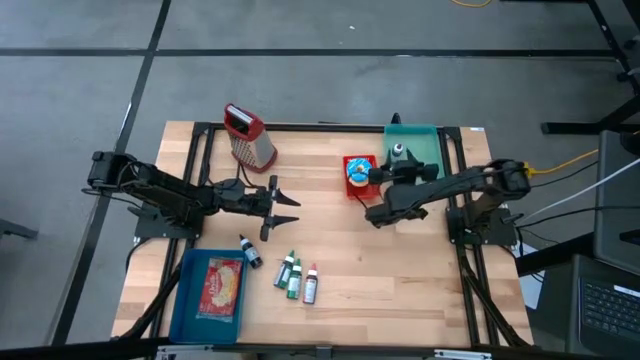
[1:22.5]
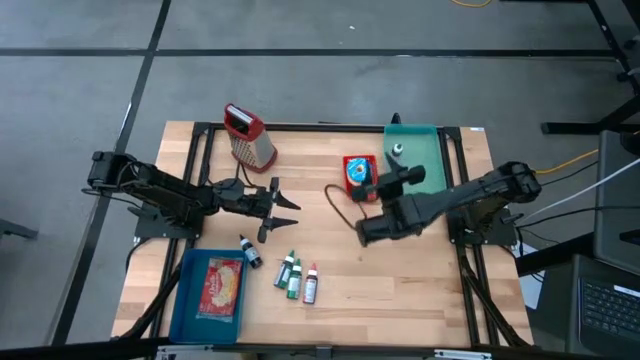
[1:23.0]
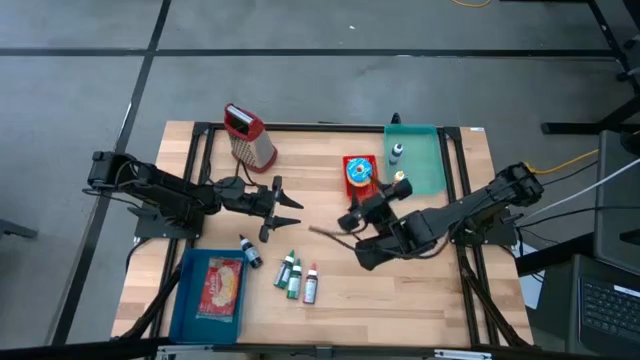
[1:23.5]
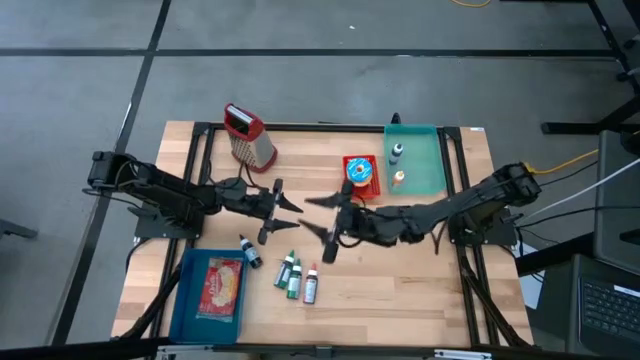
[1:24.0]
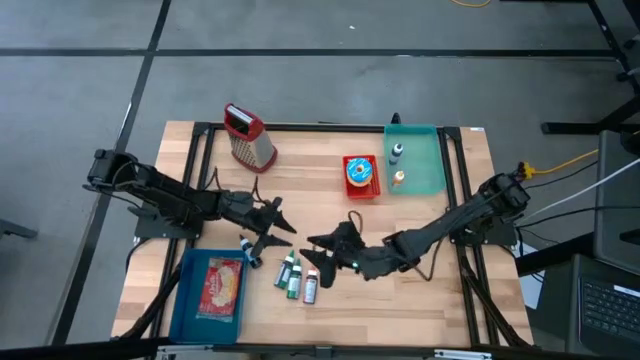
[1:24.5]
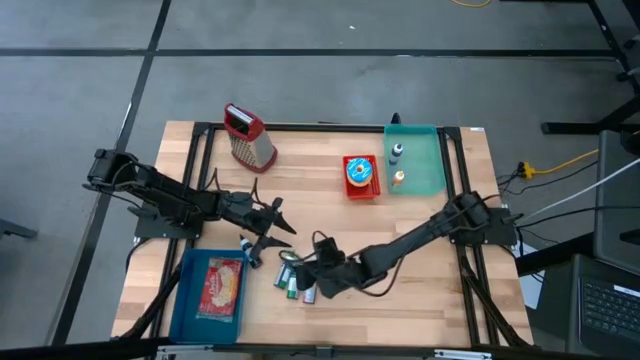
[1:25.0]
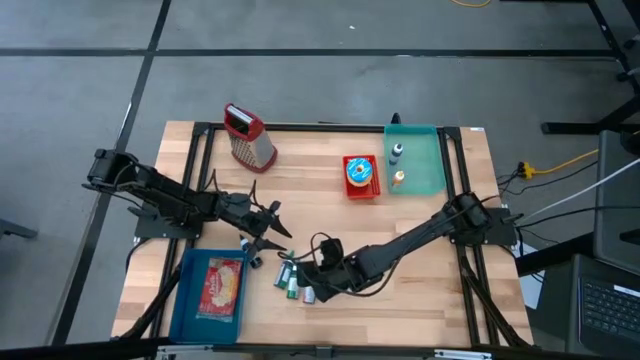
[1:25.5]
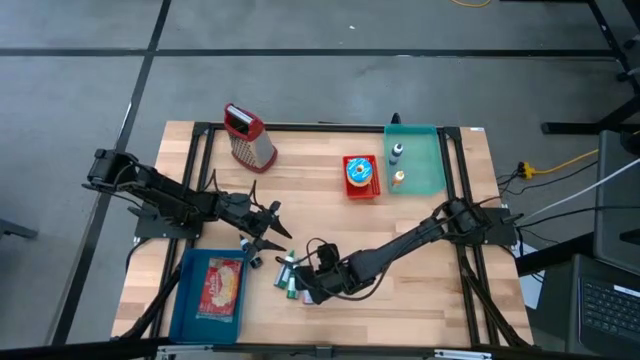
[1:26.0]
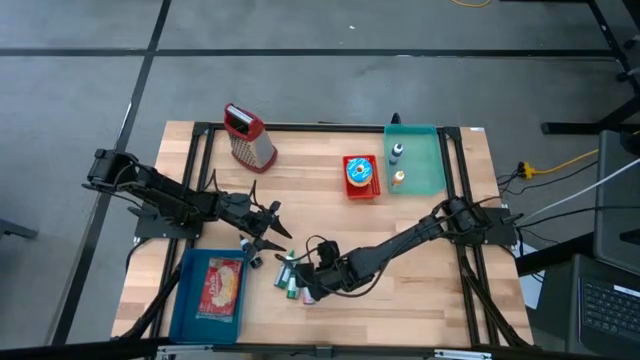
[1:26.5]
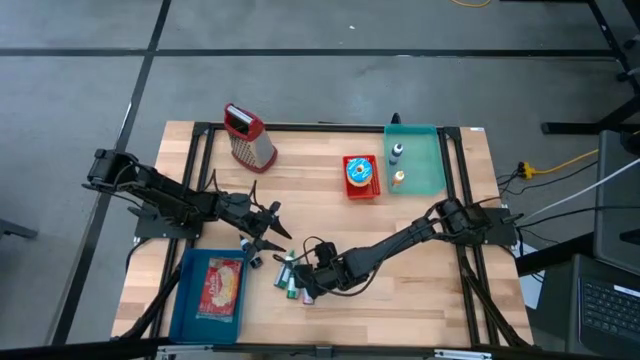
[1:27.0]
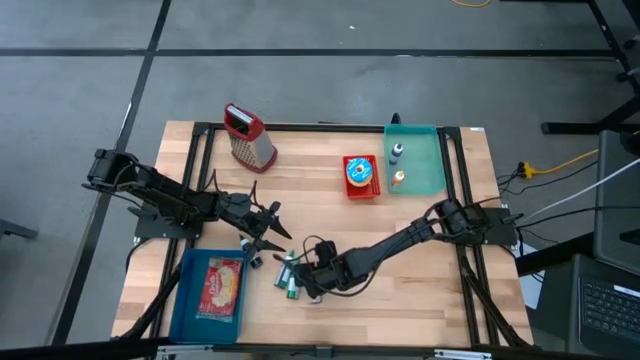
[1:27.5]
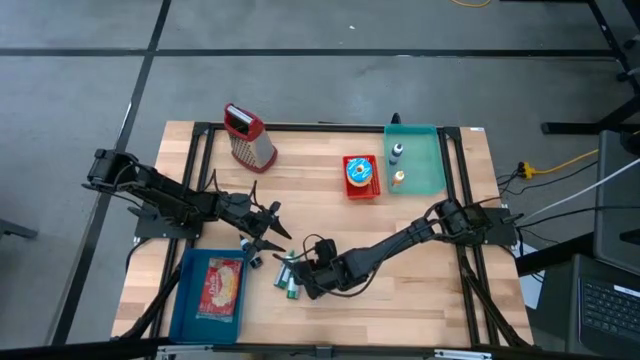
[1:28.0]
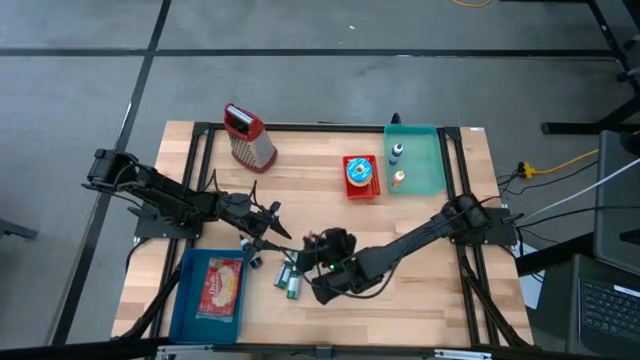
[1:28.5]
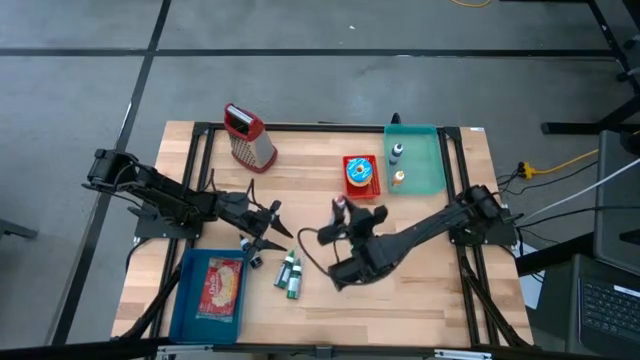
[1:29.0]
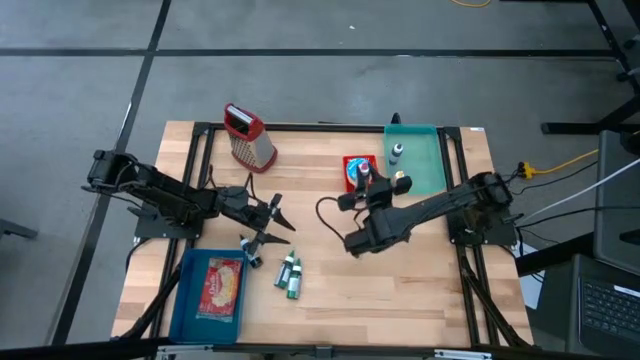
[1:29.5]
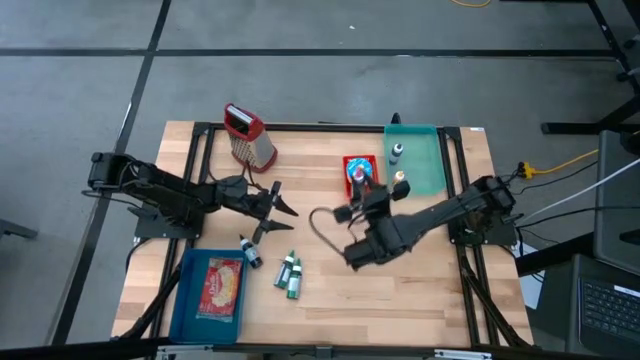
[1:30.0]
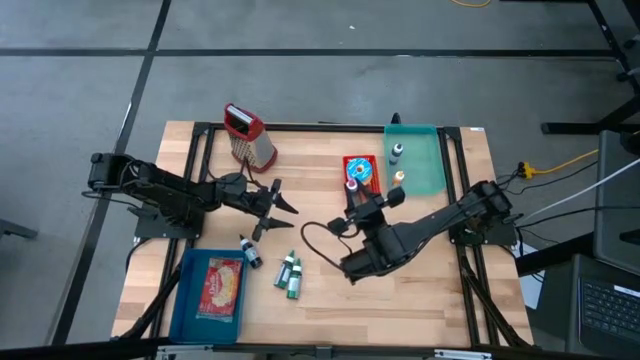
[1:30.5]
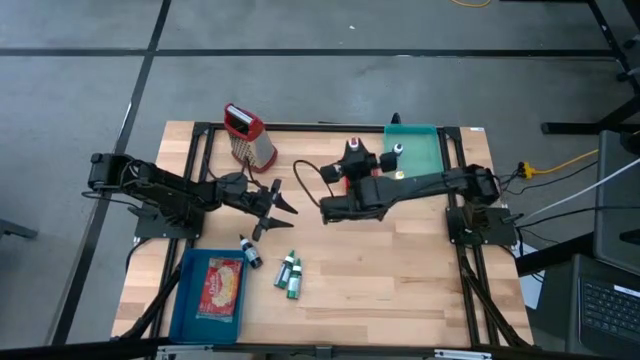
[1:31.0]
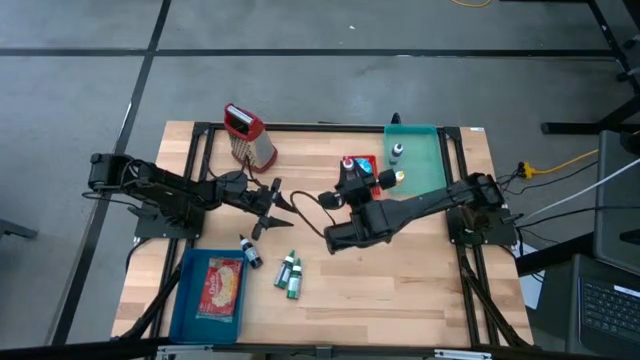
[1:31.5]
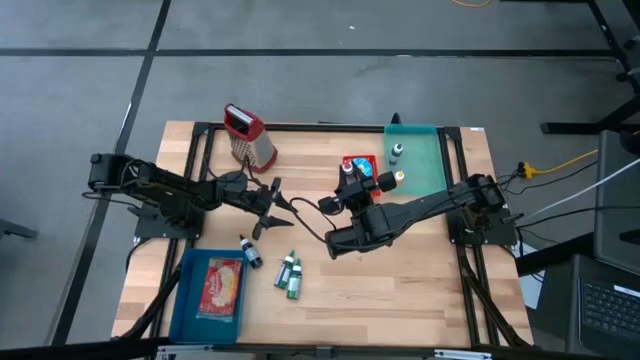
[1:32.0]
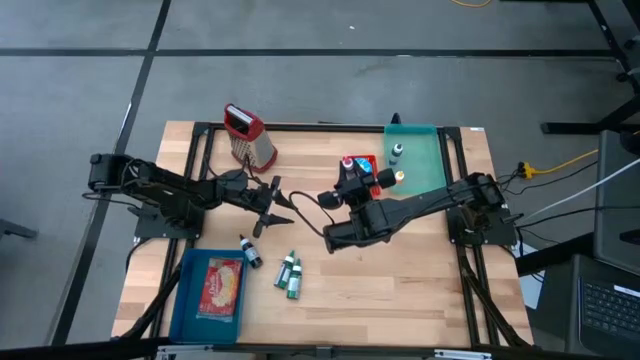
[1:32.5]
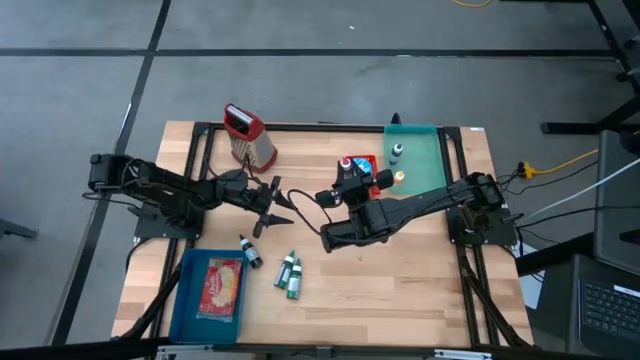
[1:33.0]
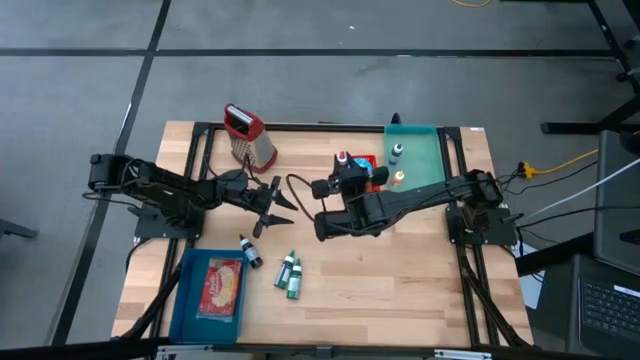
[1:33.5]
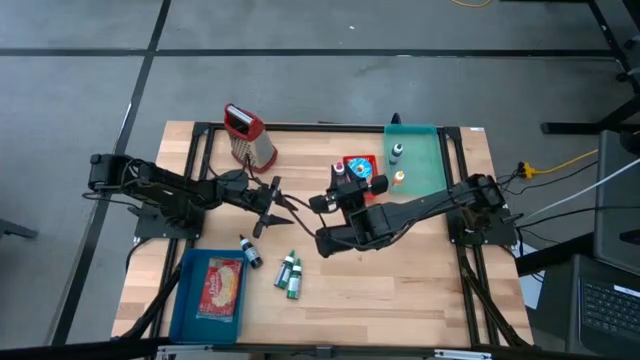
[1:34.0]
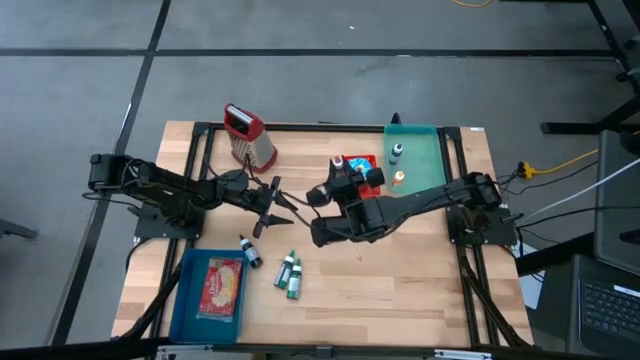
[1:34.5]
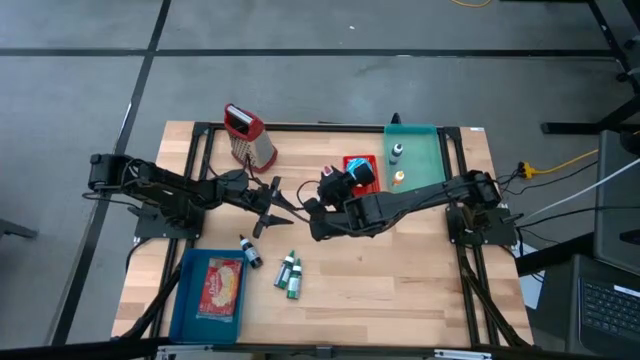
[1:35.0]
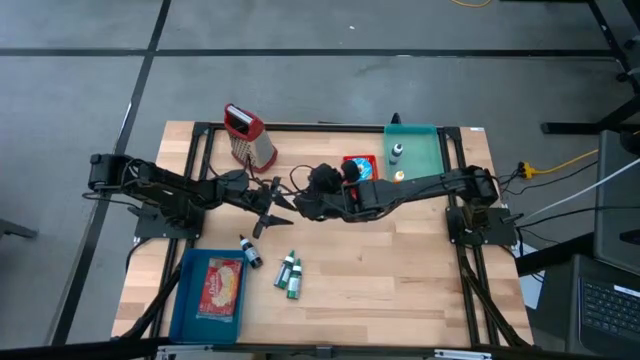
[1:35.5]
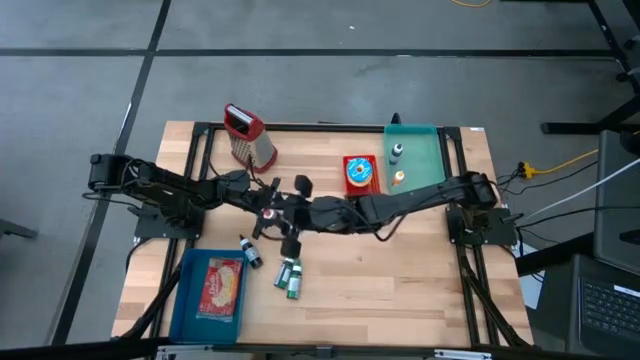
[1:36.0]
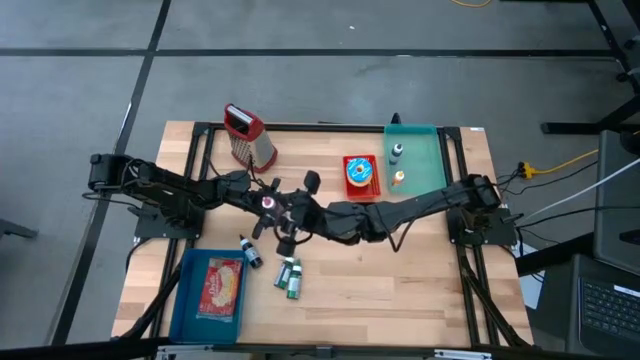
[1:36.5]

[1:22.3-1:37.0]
Put the pink food coloring bottle into the green bin
